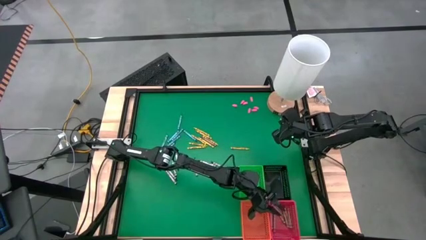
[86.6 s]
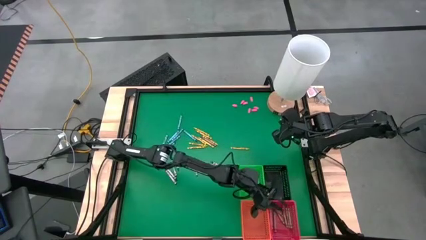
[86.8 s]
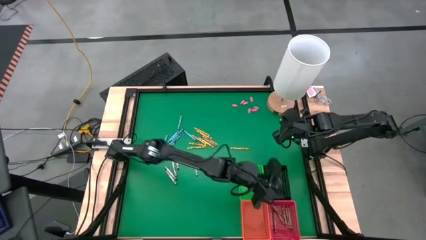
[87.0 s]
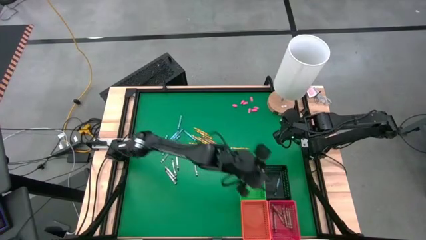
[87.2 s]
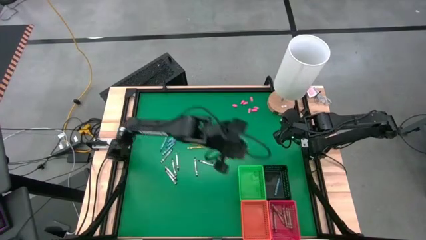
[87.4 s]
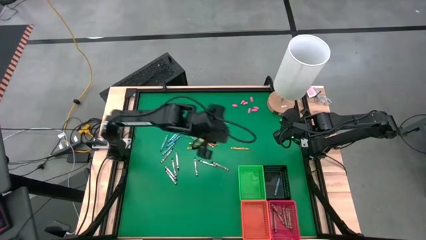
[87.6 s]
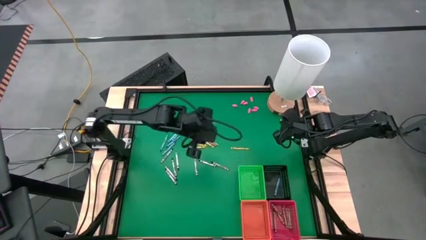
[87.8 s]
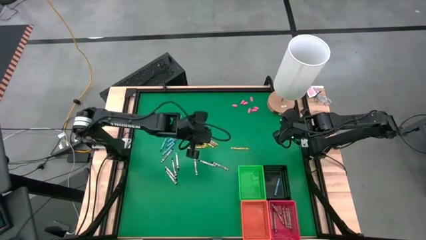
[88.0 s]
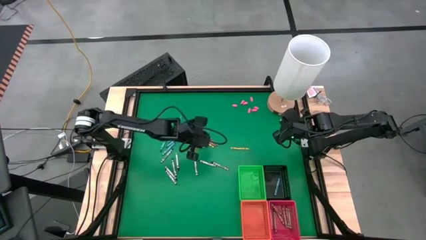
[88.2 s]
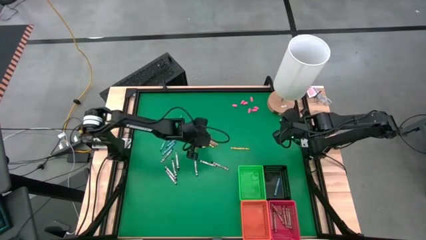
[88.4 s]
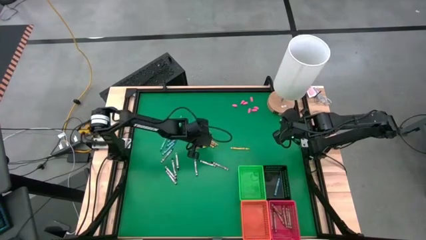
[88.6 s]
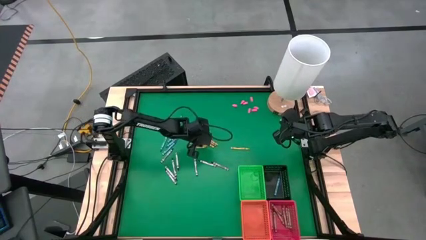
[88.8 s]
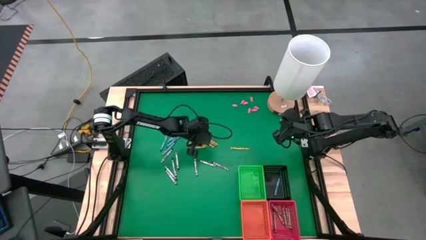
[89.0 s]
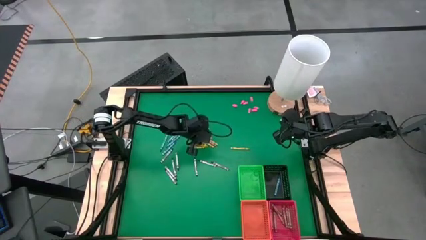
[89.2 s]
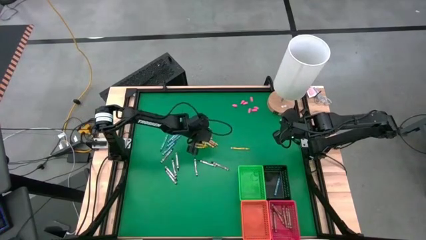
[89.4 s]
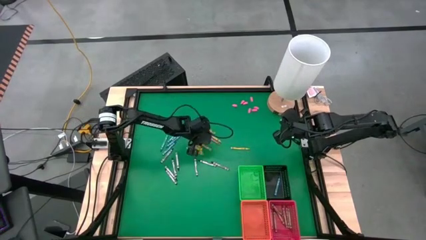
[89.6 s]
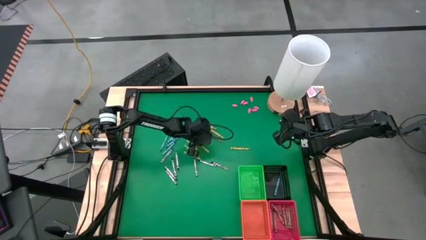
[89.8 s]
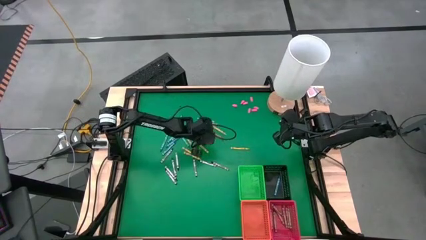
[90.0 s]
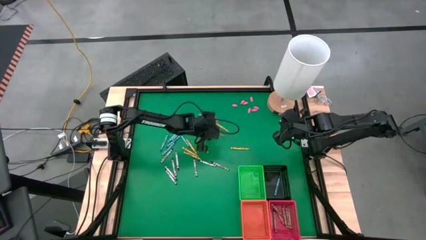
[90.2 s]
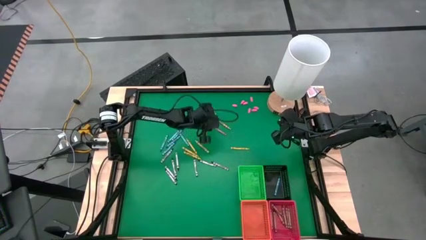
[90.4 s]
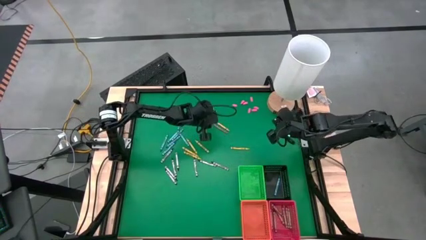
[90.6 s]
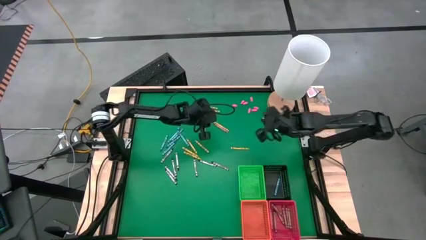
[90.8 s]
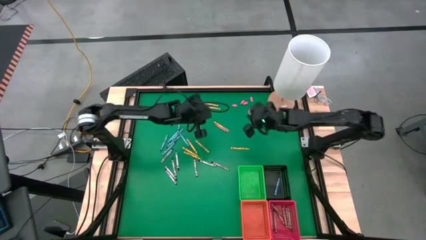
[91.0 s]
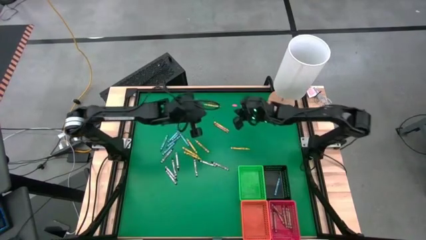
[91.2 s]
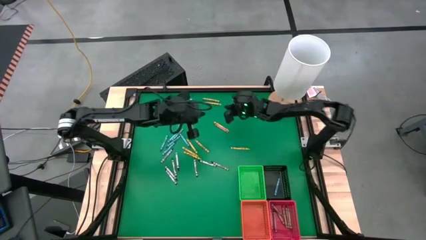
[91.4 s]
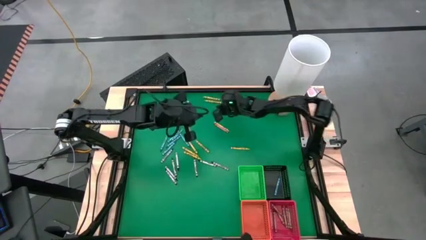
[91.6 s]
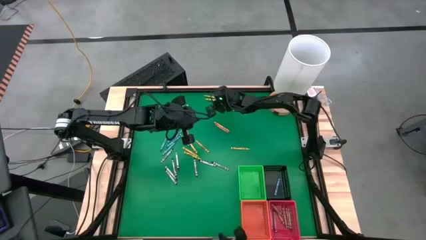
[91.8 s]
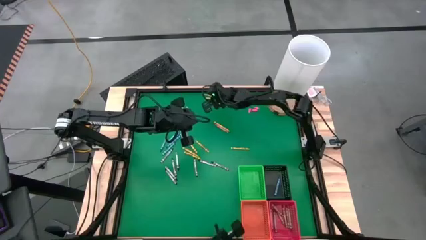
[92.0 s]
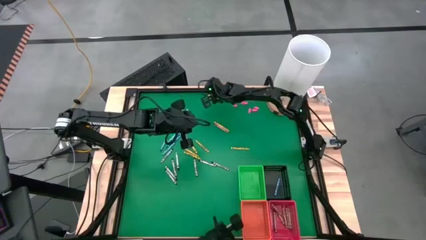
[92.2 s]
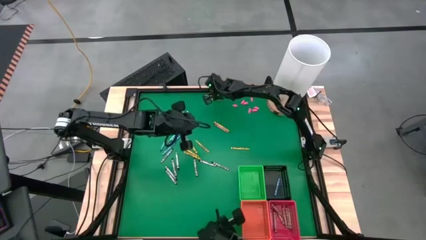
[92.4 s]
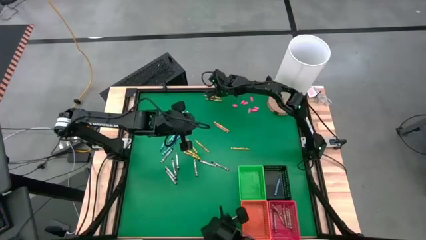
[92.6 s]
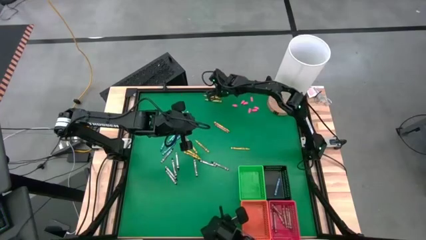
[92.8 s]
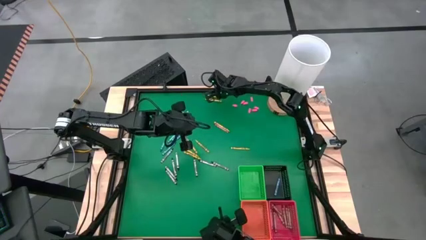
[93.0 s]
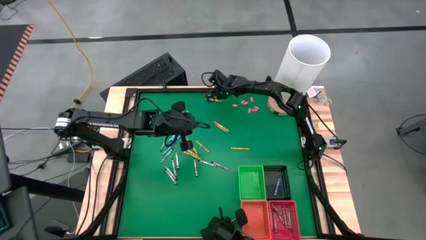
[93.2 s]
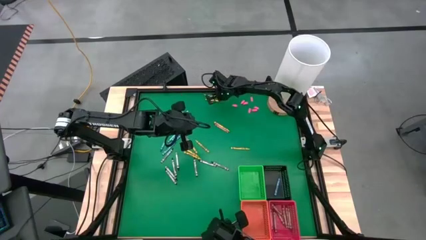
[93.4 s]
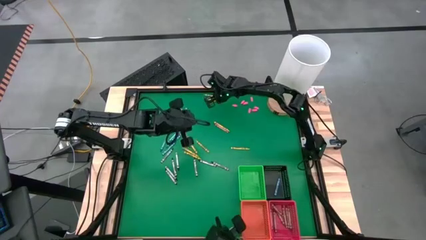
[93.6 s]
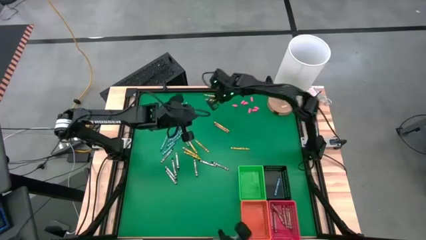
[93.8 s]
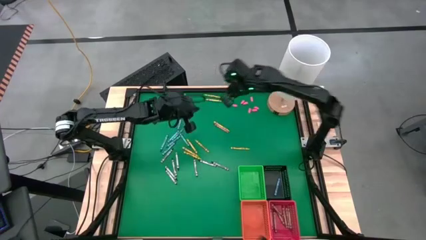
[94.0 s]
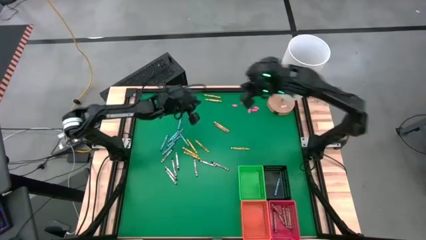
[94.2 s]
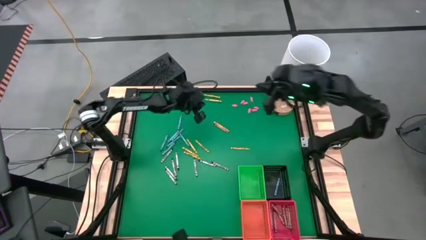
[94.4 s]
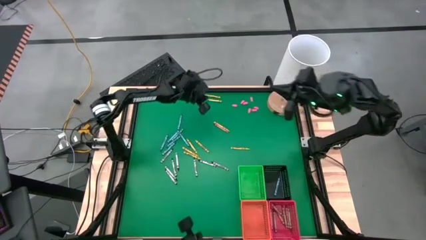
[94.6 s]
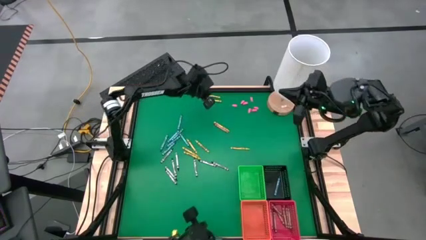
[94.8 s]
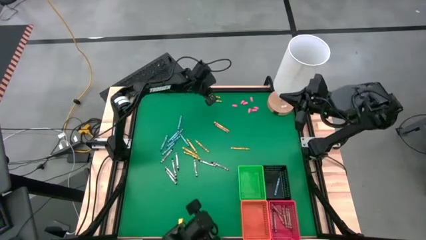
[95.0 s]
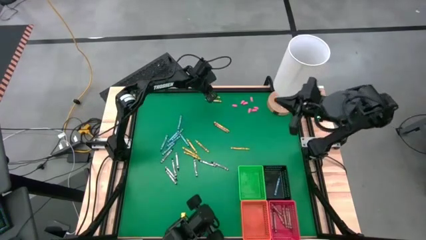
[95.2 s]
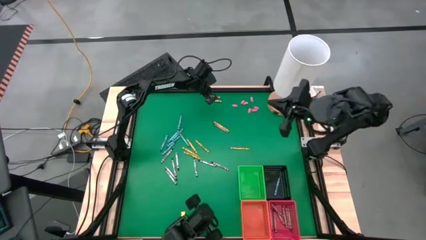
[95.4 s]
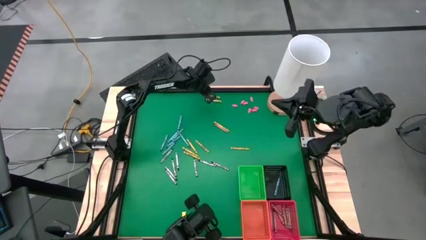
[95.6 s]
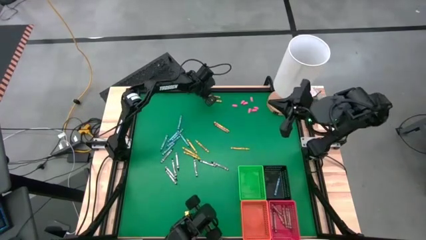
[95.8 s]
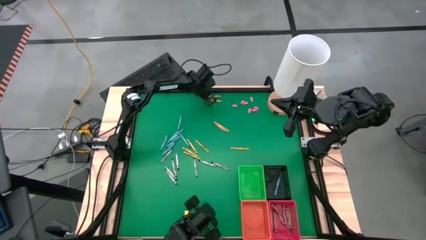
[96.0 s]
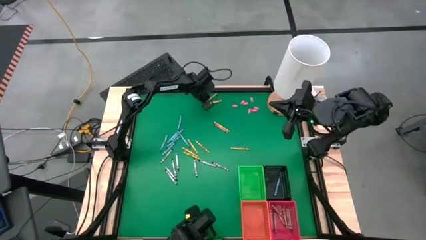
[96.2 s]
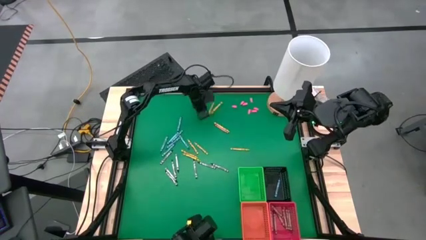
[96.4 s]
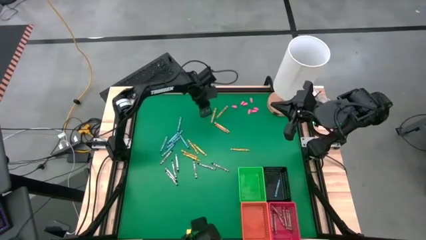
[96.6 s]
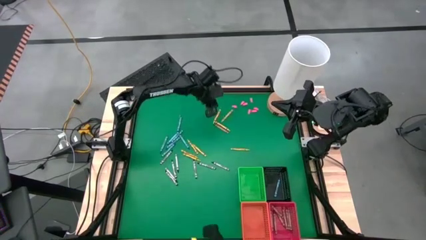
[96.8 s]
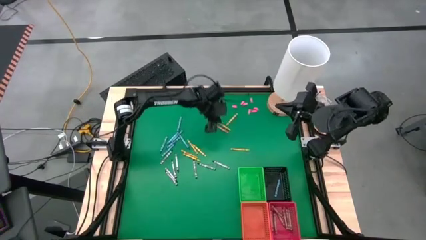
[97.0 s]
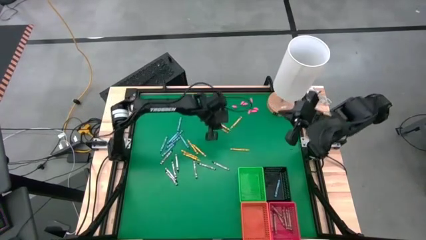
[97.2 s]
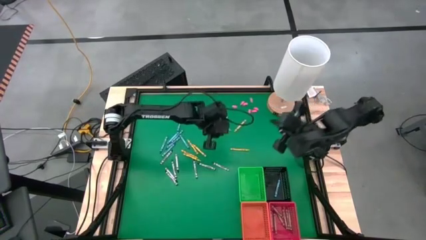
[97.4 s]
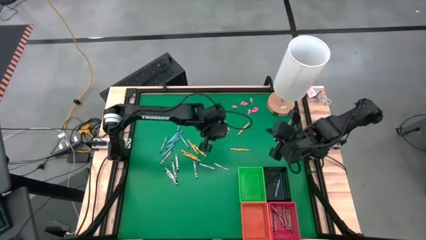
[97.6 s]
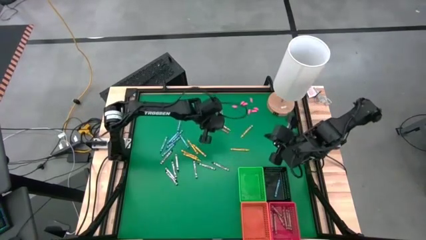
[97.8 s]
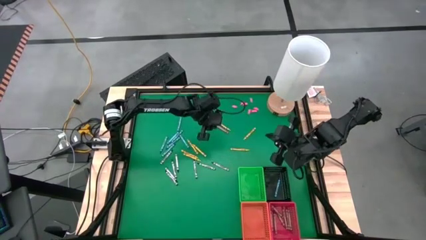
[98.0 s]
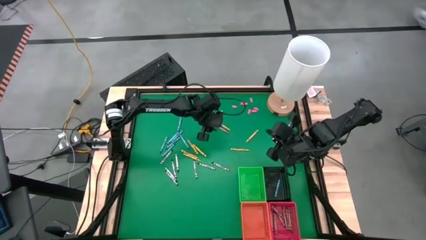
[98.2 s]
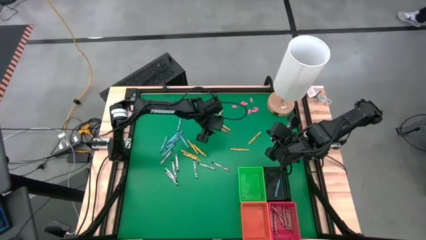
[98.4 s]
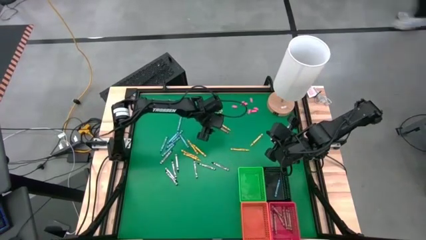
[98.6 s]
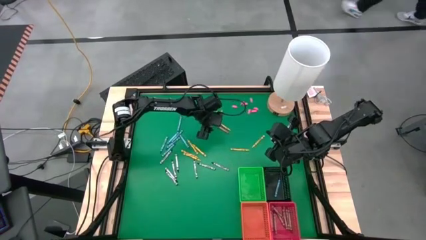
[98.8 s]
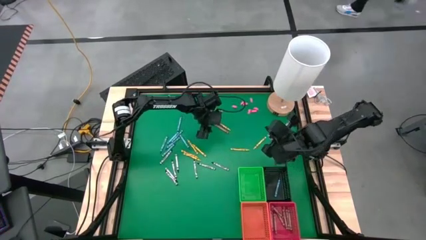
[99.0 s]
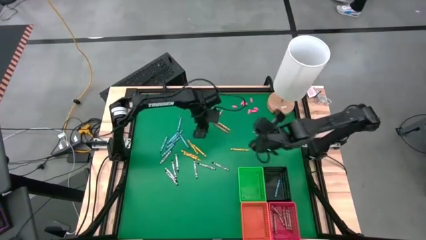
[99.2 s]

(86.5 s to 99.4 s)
Task: Sort crayons
Put the brown crayon into the red bin

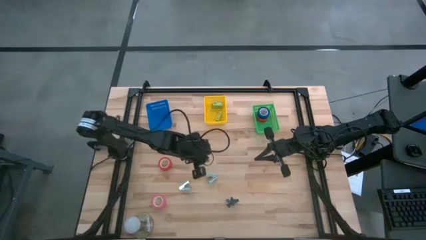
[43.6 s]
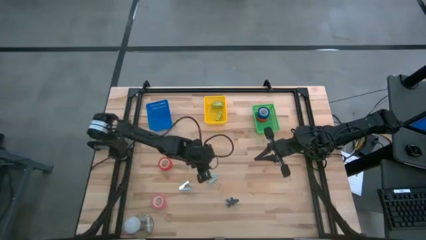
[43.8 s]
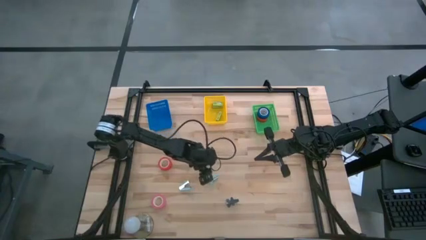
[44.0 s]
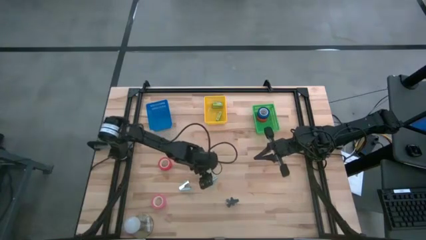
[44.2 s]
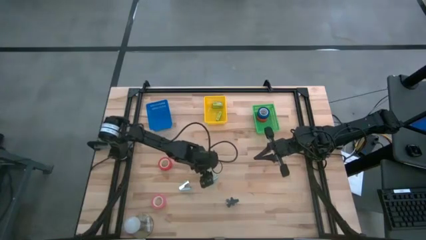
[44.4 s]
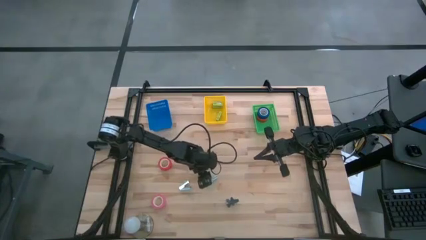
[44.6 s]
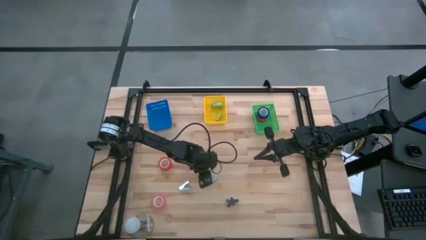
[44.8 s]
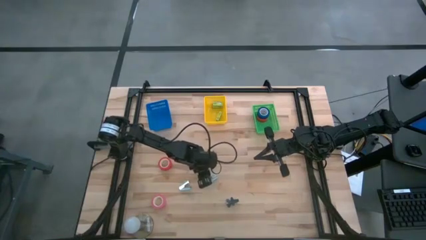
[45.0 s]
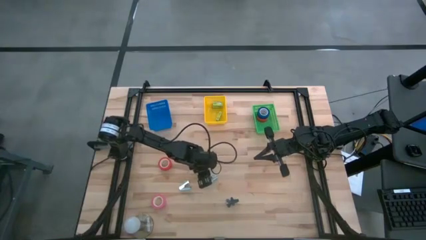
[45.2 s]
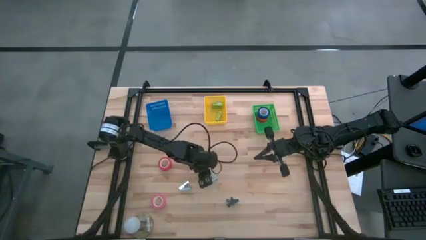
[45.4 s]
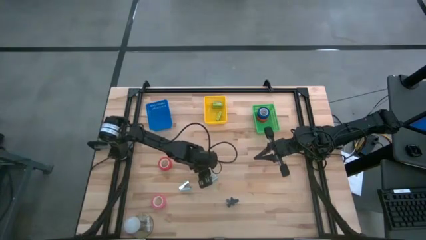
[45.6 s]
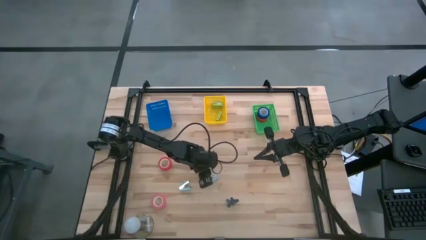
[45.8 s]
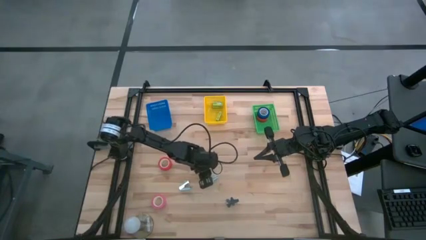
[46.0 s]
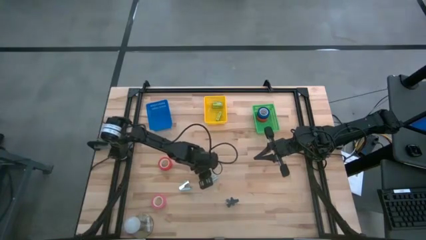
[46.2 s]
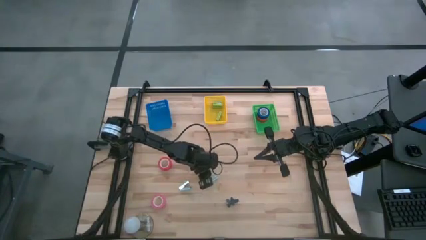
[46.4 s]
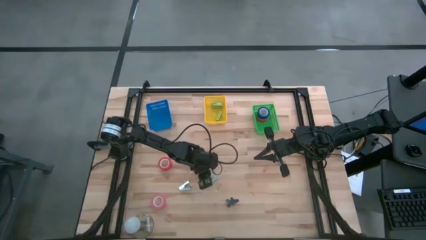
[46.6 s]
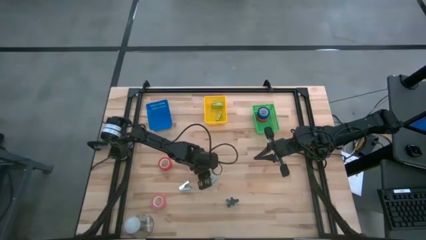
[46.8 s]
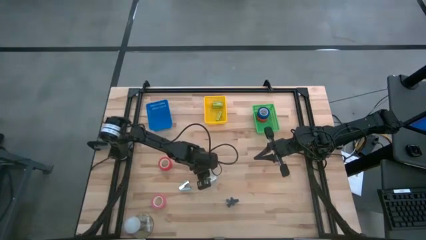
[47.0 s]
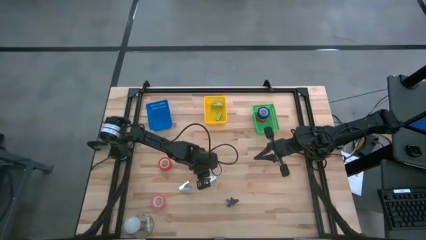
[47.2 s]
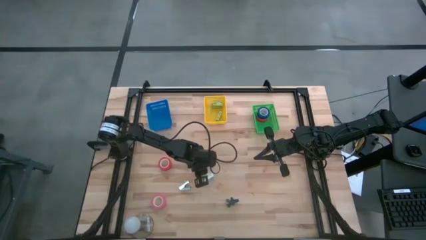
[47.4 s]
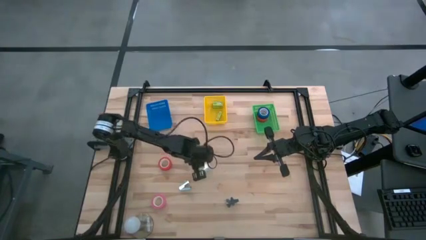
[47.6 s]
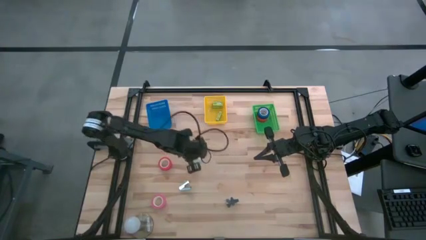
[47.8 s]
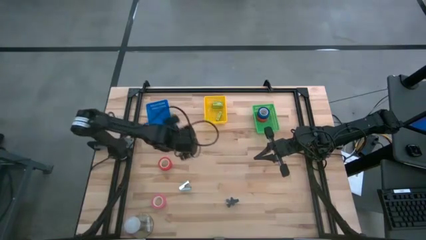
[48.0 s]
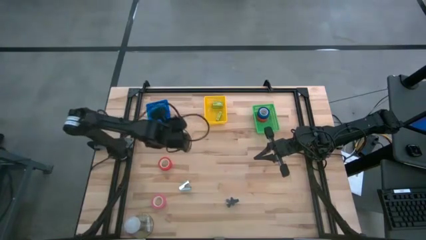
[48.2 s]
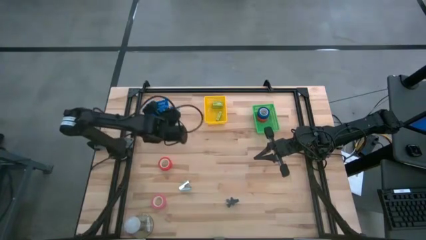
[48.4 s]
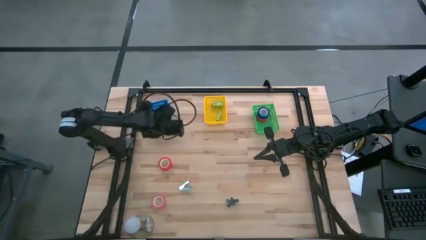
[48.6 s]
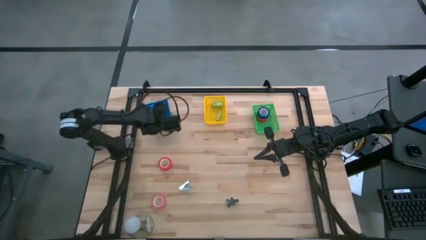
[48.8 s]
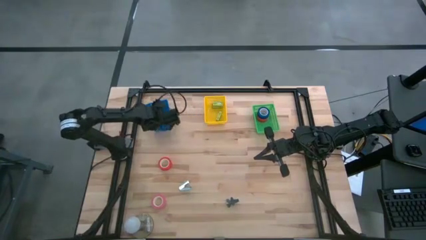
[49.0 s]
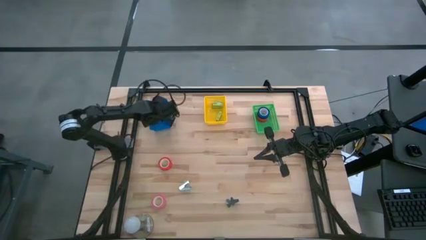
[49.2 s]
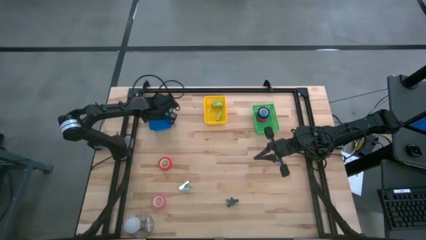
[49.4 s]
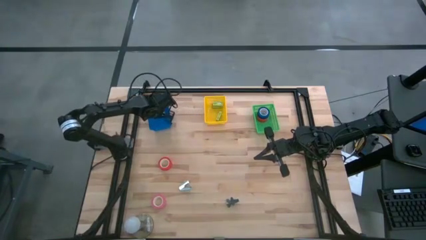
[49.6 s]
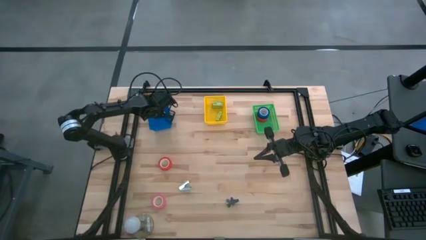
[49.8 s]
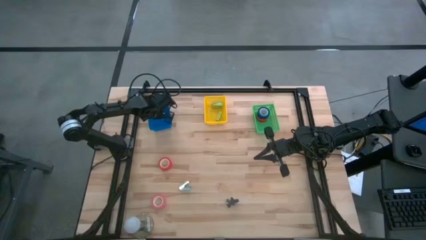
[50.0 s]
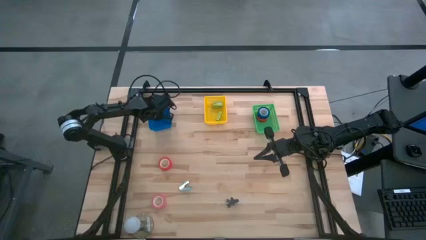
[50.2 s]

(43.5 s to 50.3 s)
Task: Pick and place Stapler, Stapler remover, tape
Put the right light blue staple remover into the blue bin
